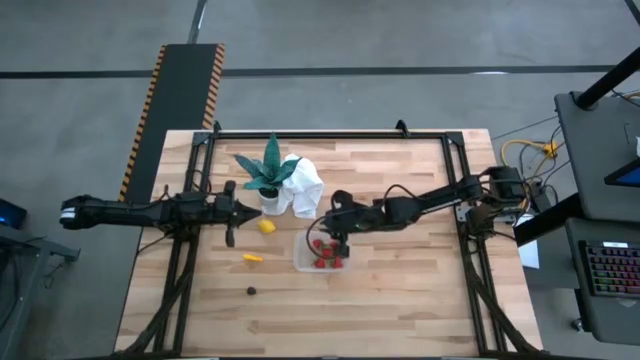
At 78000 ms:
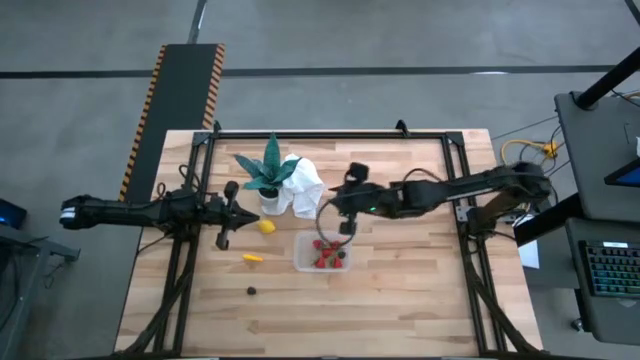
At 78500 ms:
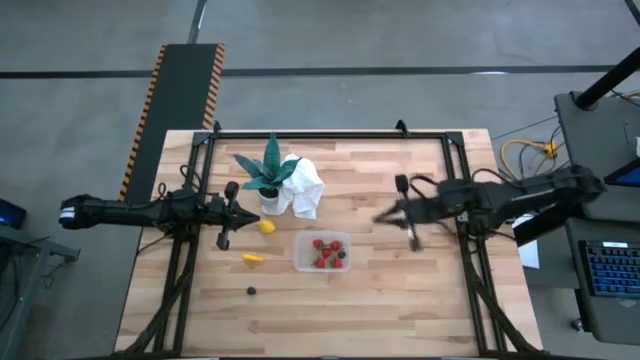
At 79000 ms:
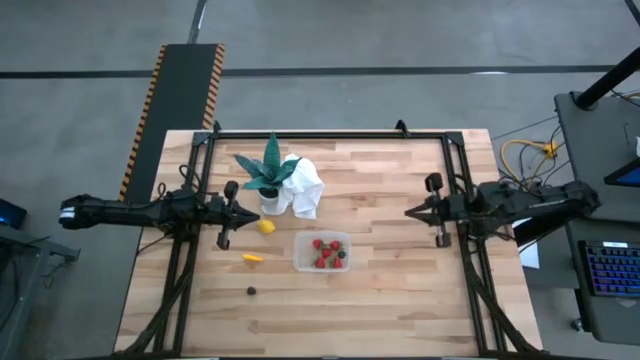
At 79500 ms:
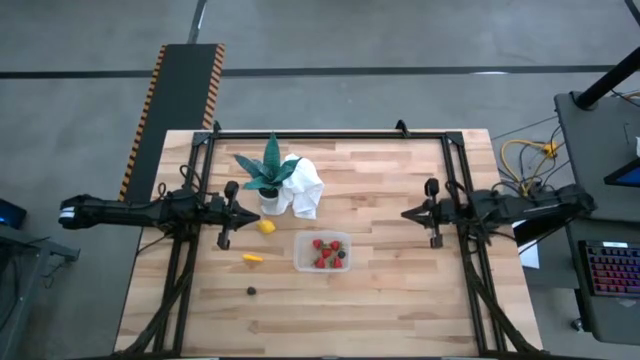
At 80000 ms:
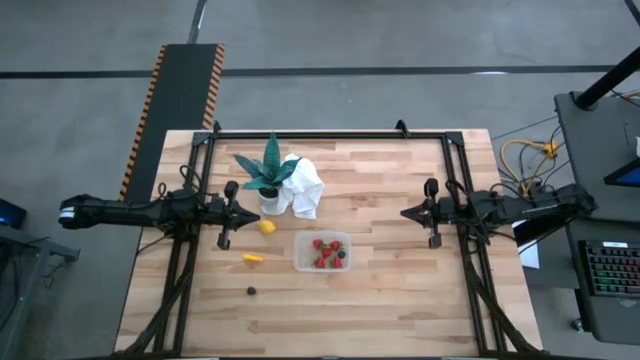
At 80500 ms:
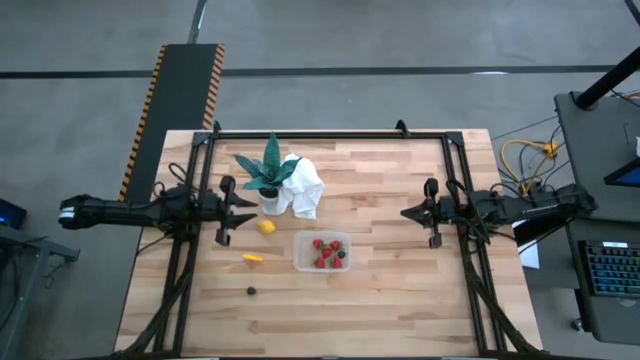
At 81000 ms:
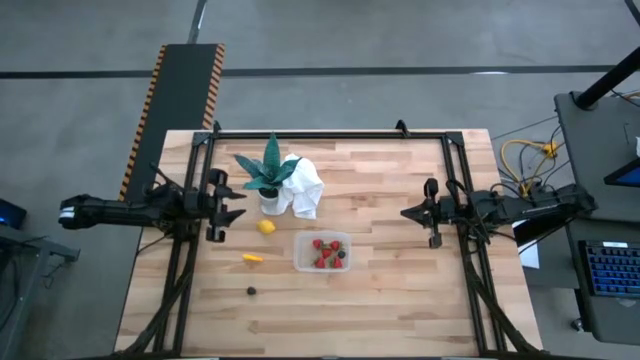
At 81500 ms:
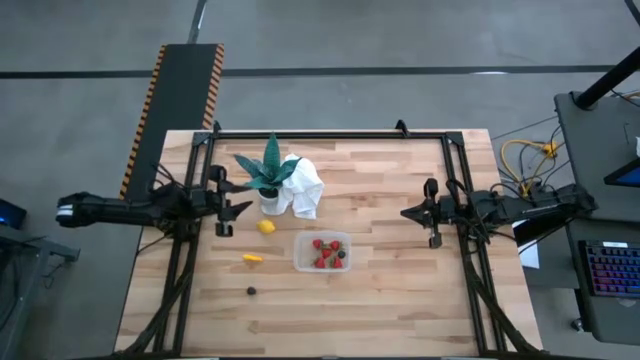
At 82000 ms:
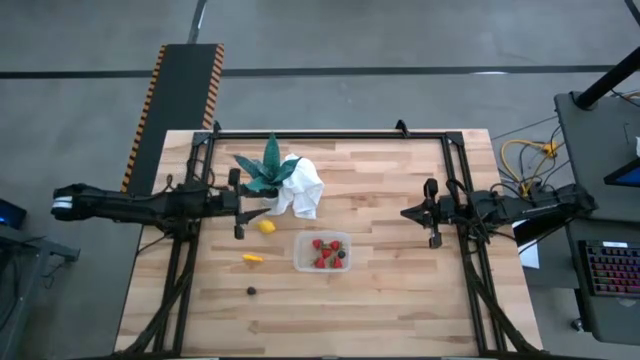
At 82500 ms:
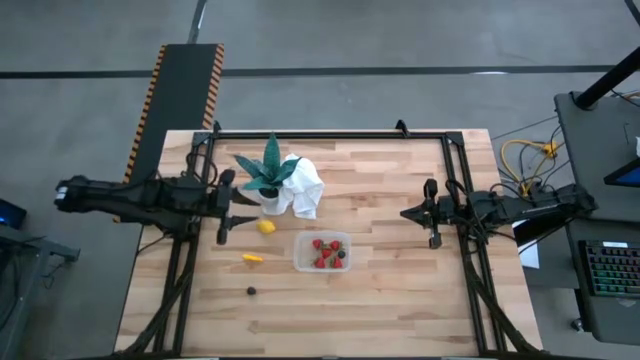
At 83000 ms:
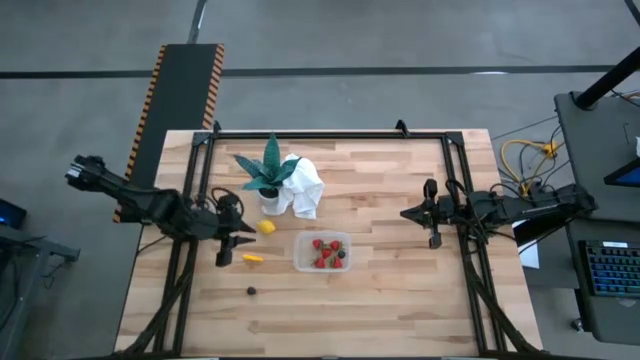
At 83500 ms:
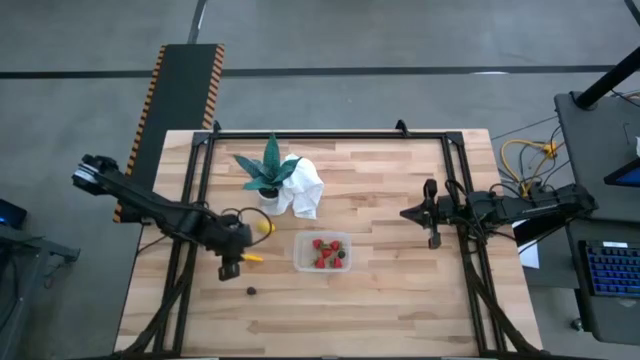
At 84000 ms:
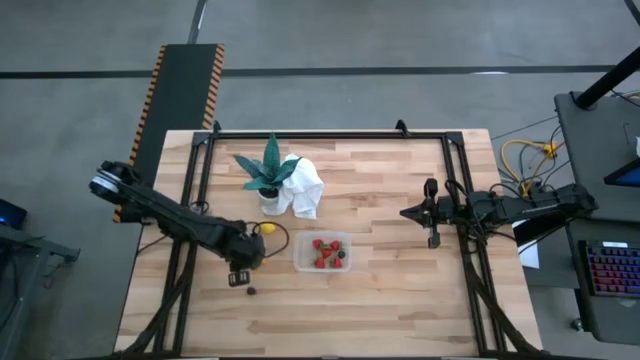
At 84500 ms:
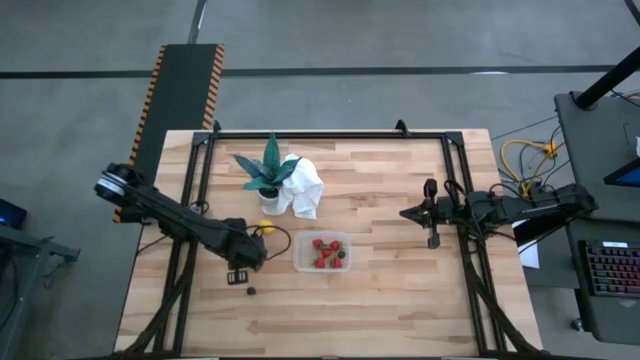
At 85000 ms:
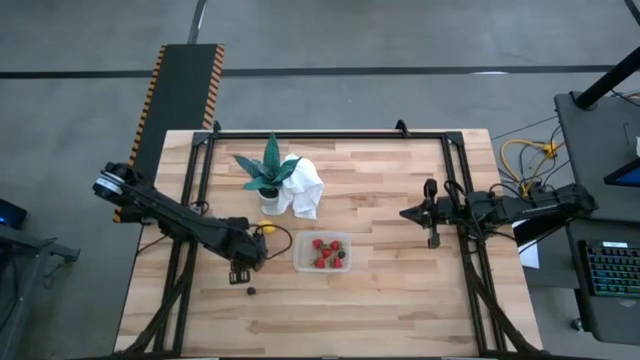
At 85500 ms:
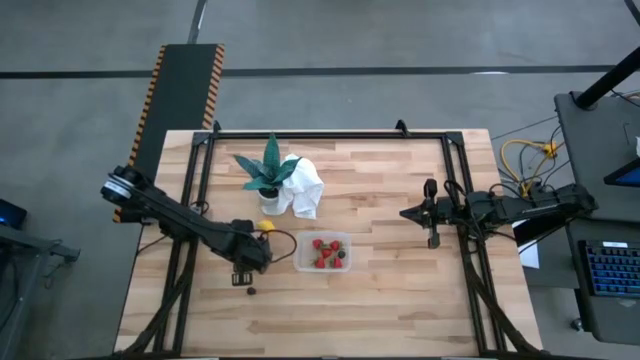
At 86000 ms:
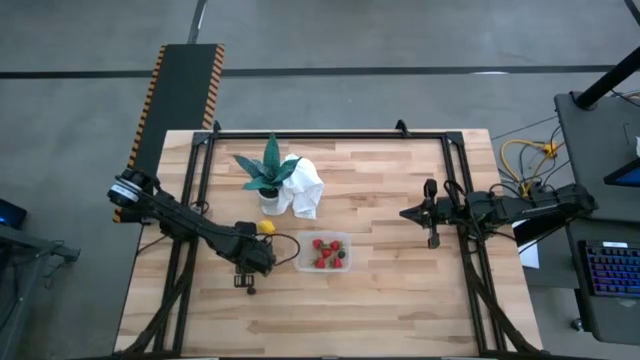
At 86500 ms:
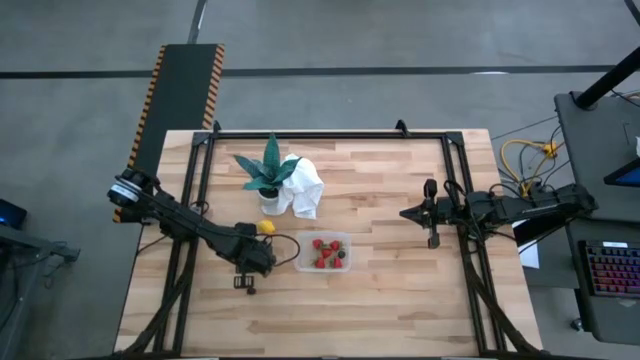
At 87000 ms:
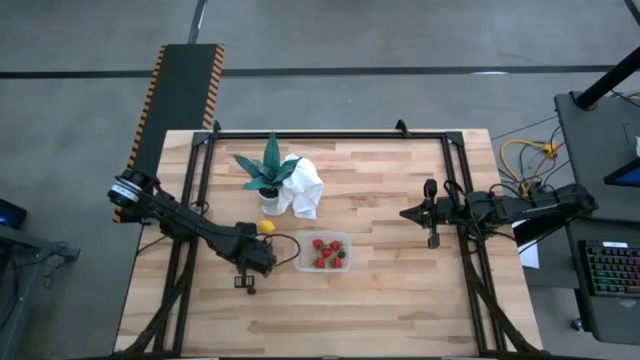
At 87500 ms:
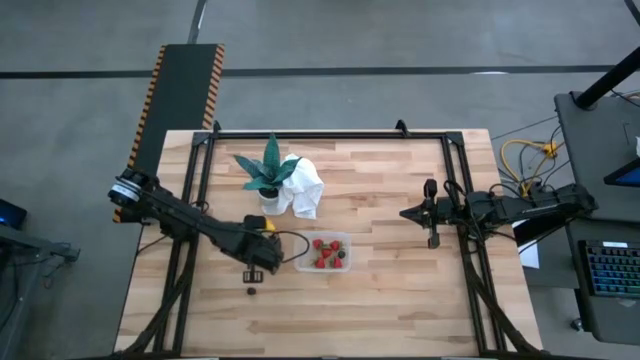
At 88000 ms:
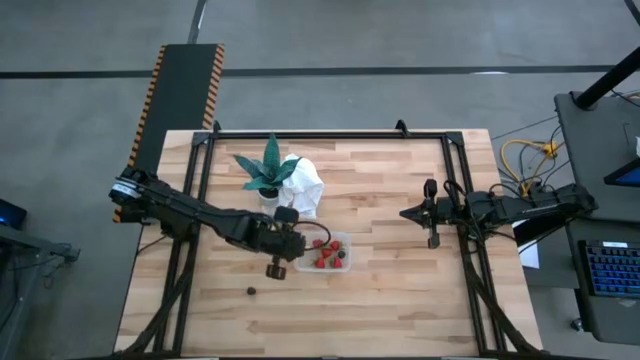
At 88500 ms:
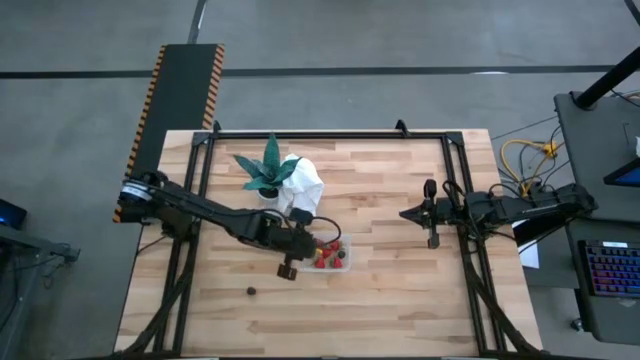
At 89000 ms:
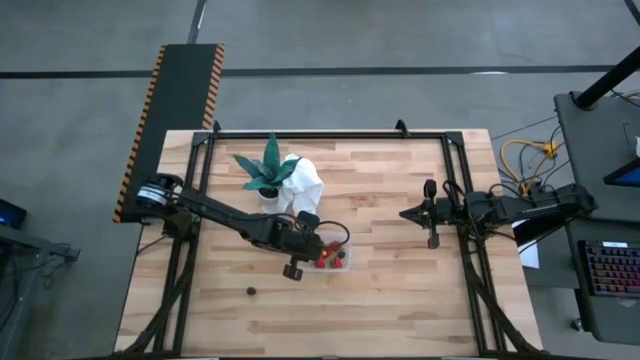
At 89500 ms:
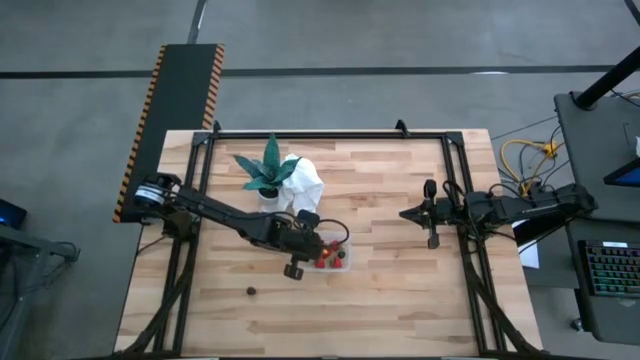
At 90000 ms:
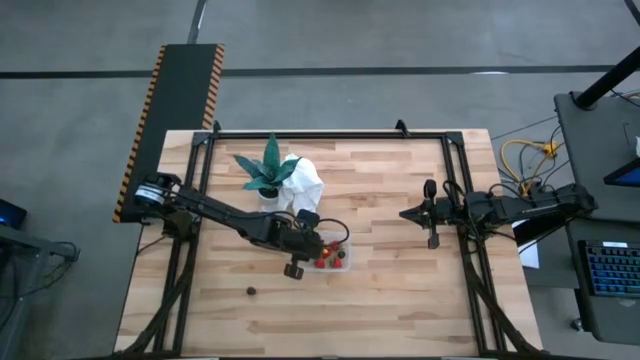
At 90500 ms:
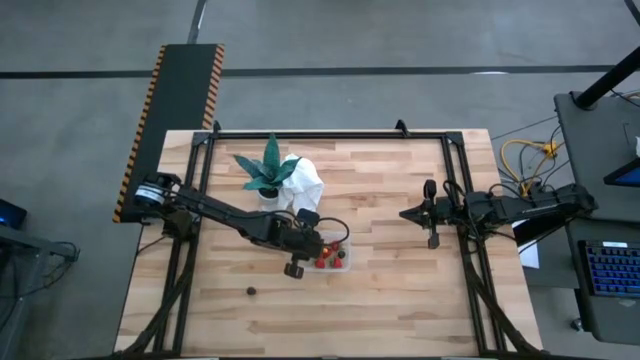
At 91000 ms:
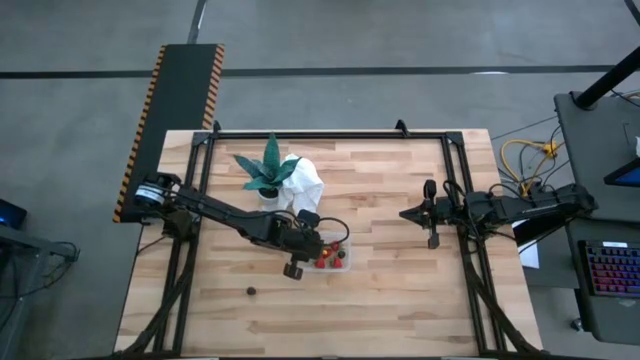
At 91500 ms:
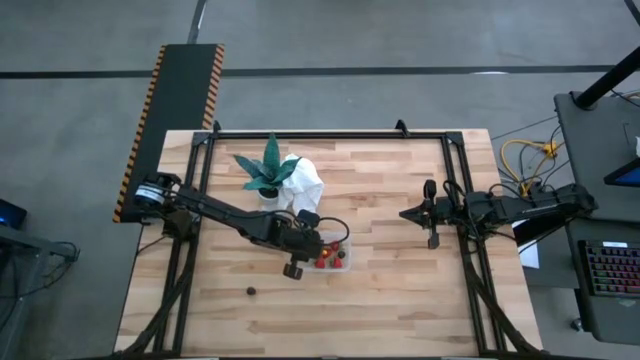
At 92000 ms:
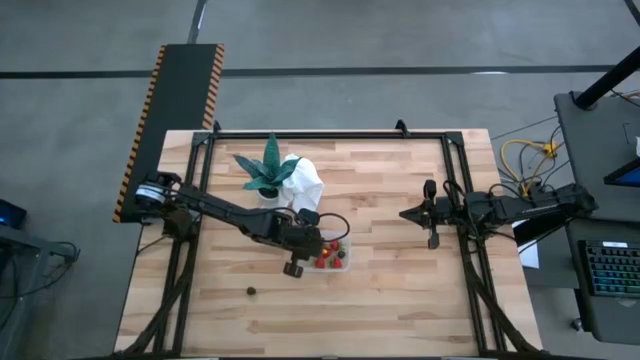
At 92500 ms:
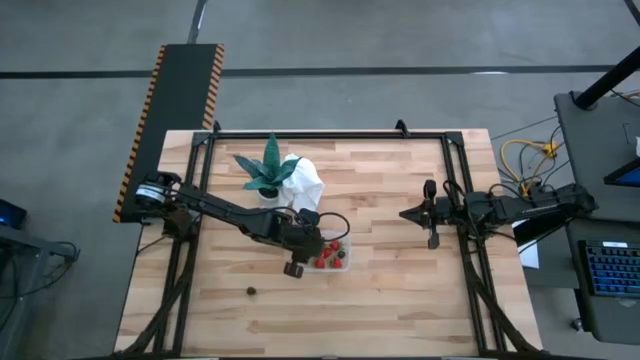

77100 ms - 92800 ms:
Task: Pick and placing Produce into tupperware
Put the corn cob into the bin

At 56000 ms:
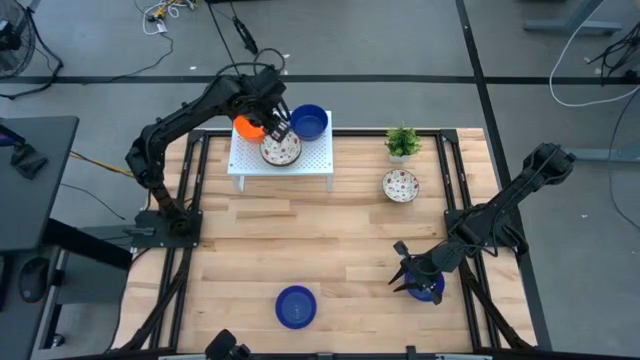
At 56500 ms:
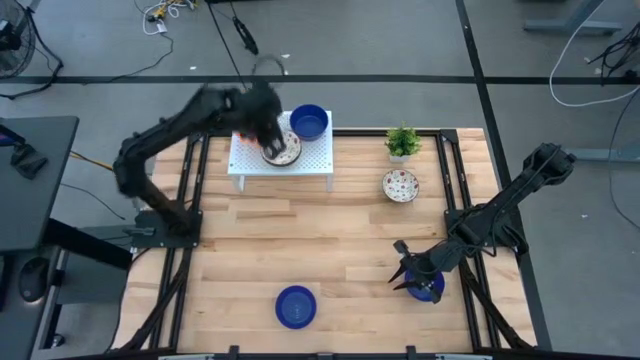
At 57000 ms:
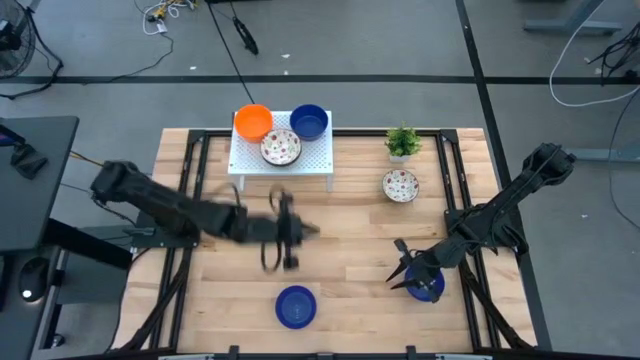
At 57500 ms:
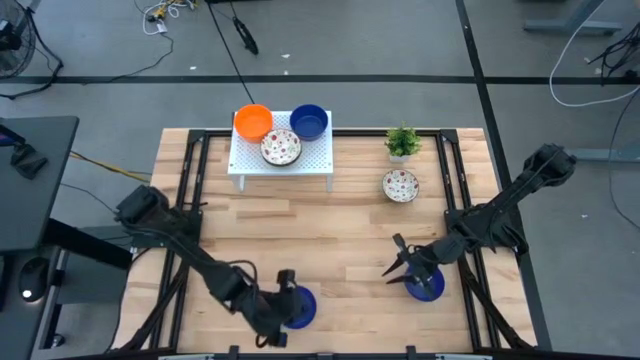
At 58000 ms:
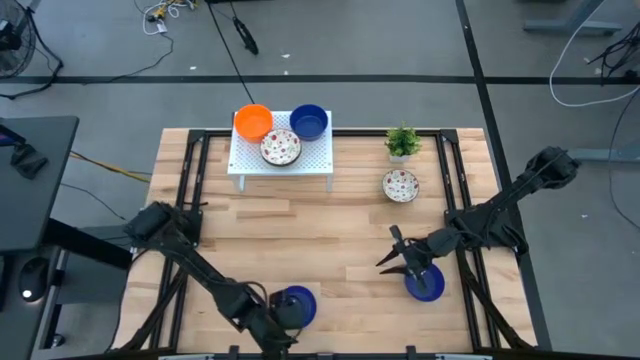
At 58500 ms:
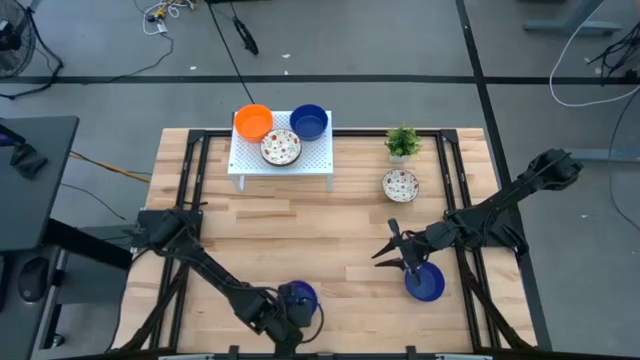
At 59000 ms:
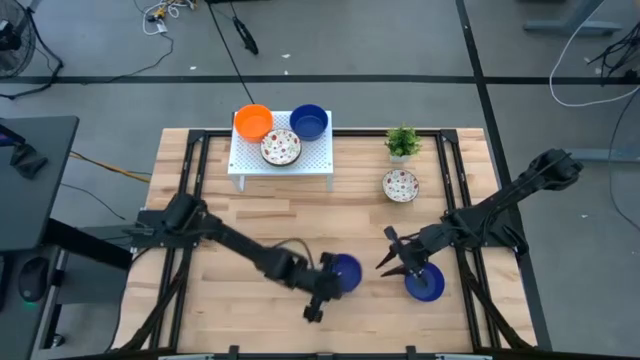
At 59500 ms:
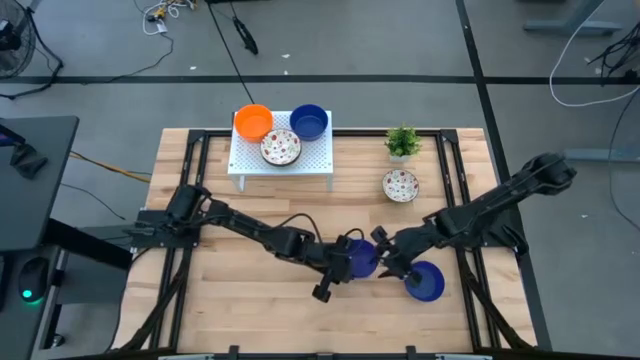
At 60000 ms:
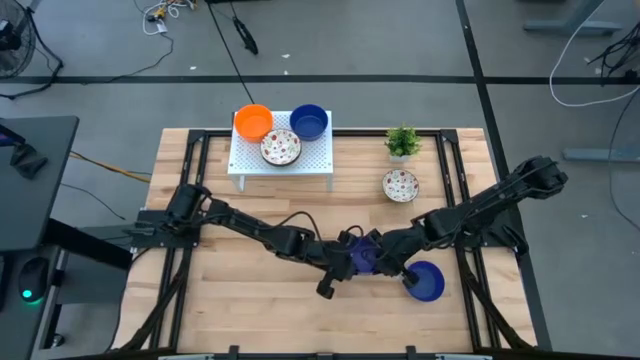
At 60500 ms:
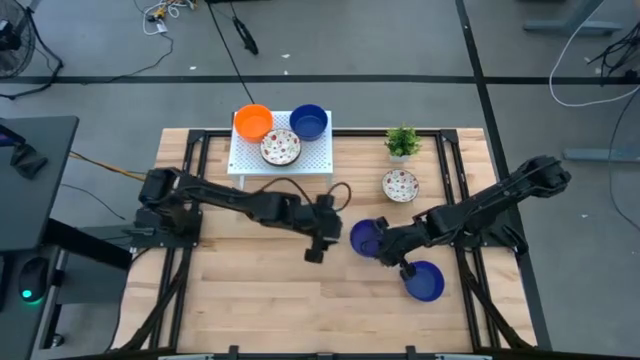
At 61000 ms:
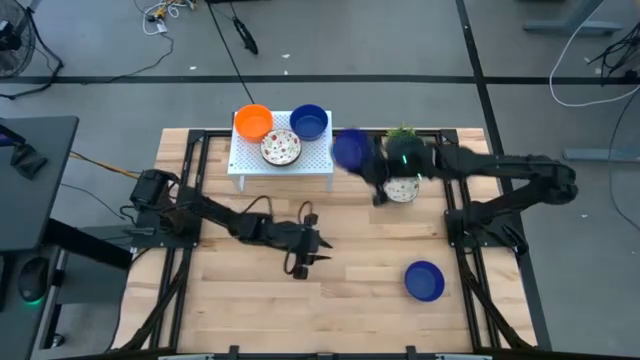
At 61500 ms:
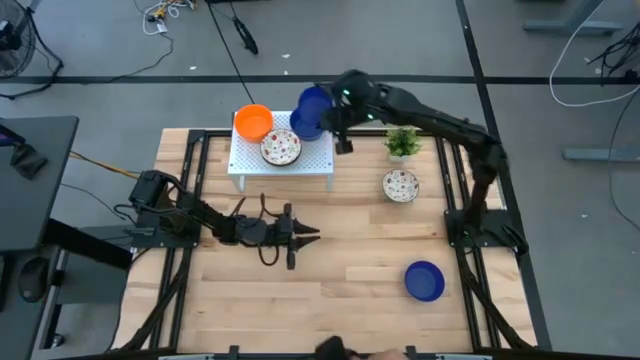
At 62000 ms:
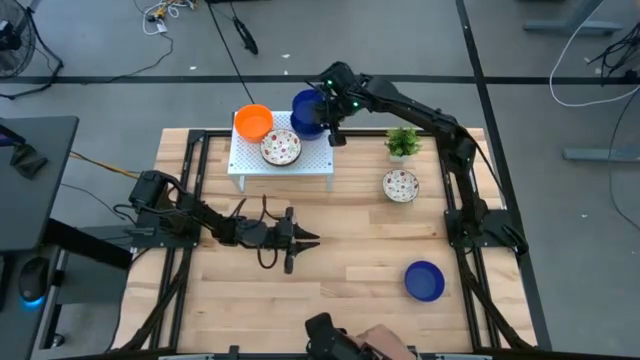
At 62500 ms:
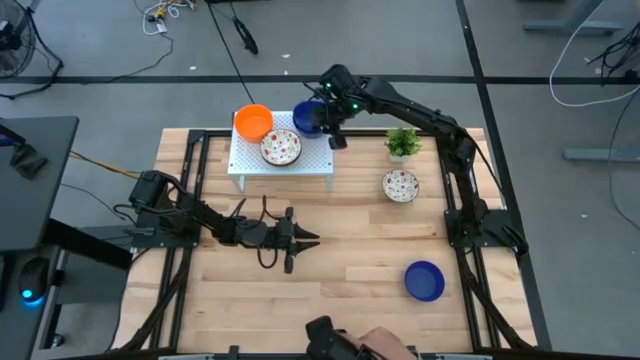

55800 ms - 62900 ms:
Task: Pick & Place Mini bowls
Stack the blue bowl on top of the blue bowl on the shelf
